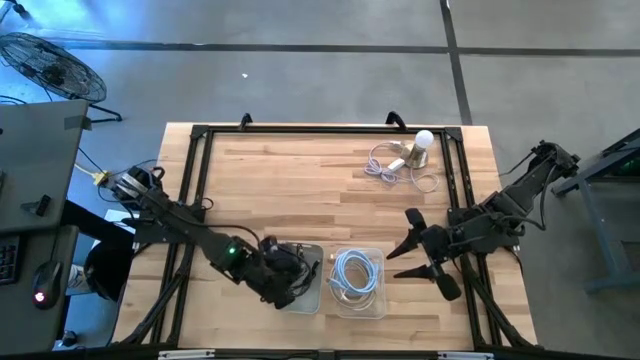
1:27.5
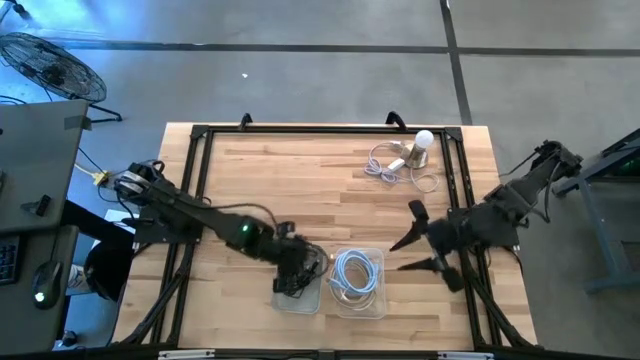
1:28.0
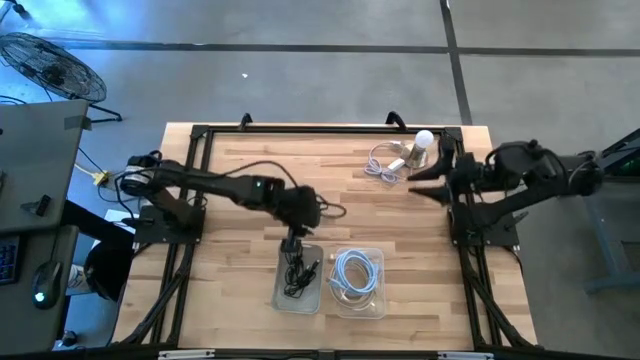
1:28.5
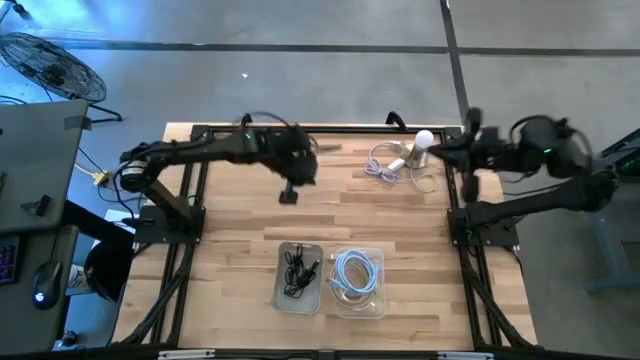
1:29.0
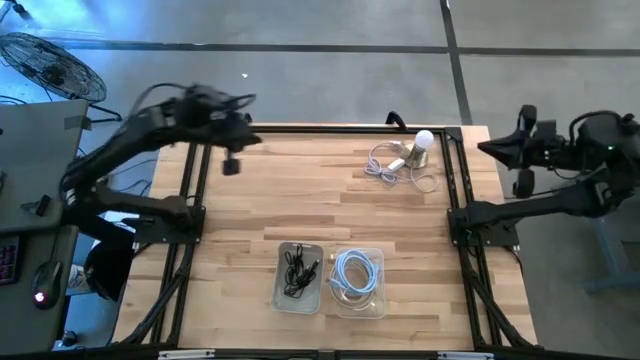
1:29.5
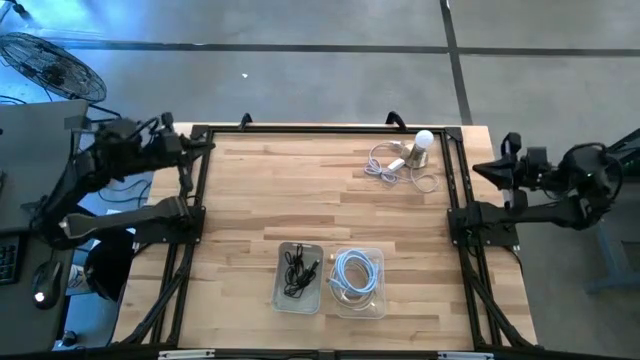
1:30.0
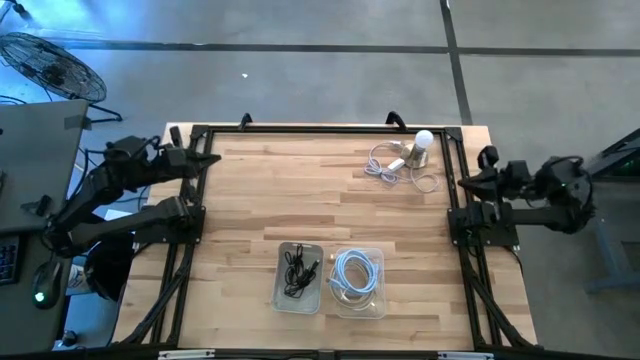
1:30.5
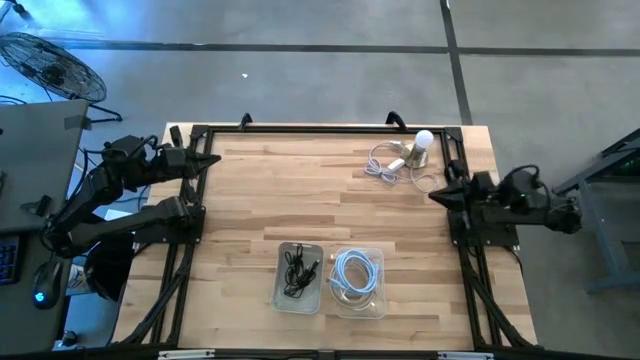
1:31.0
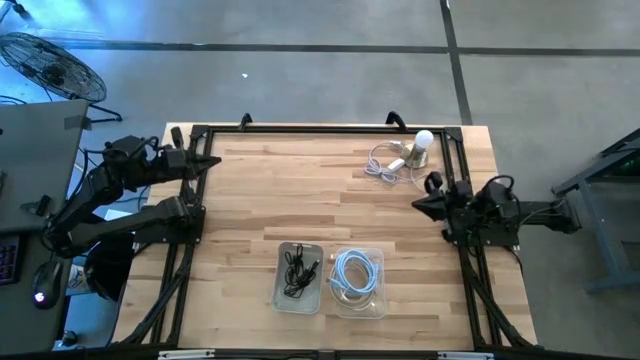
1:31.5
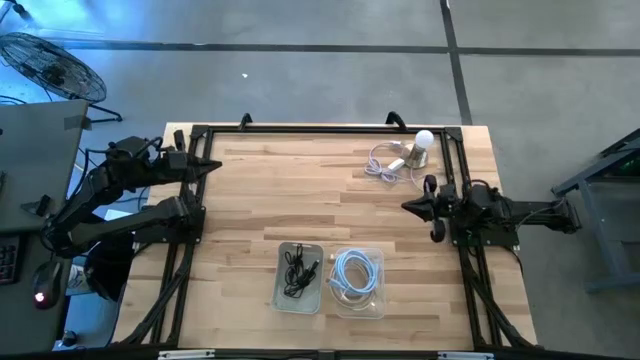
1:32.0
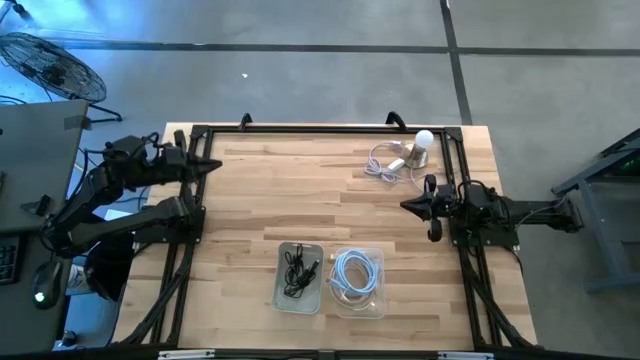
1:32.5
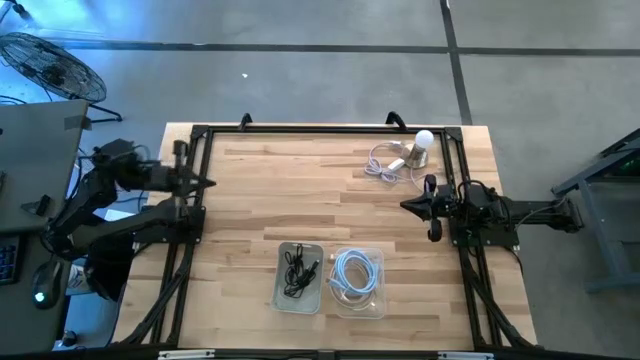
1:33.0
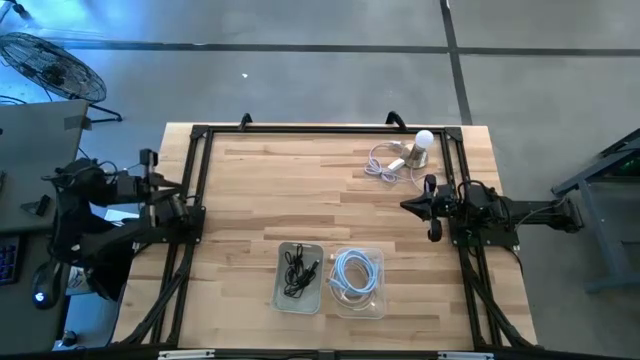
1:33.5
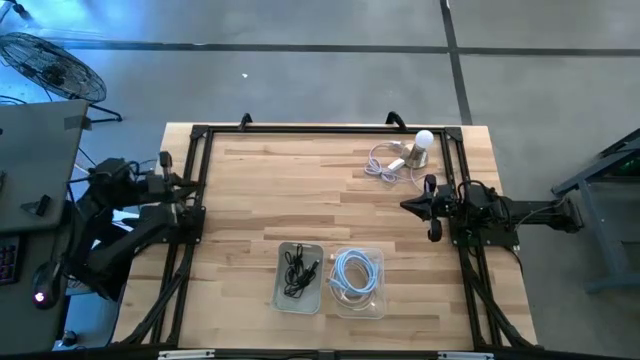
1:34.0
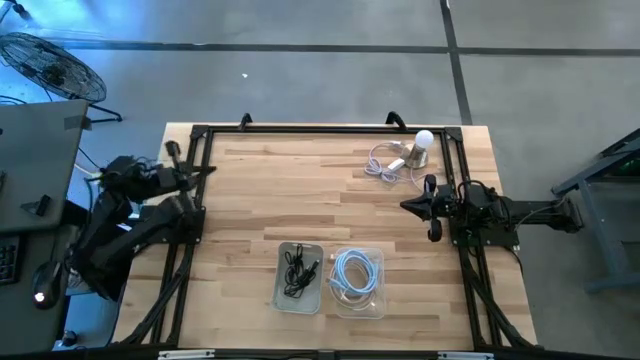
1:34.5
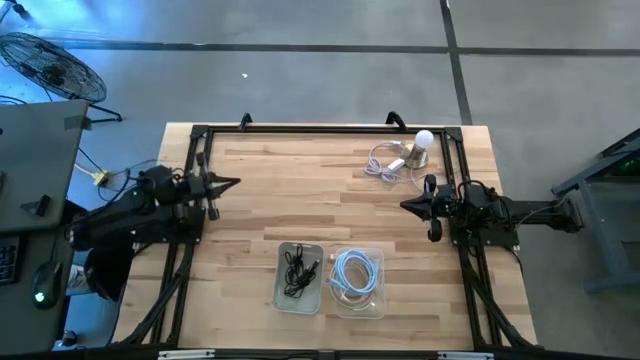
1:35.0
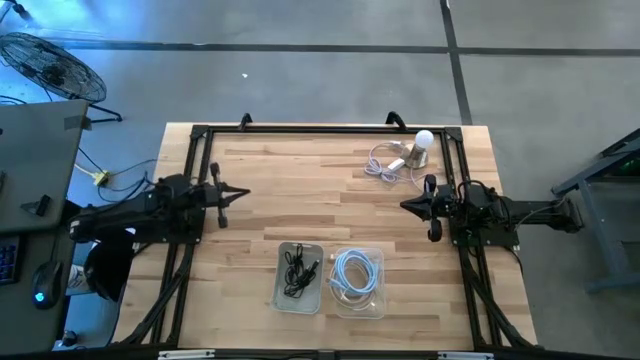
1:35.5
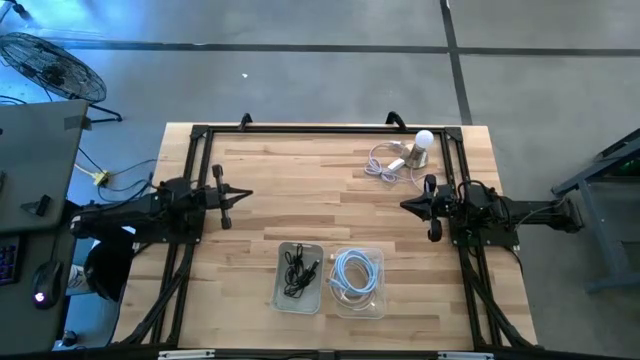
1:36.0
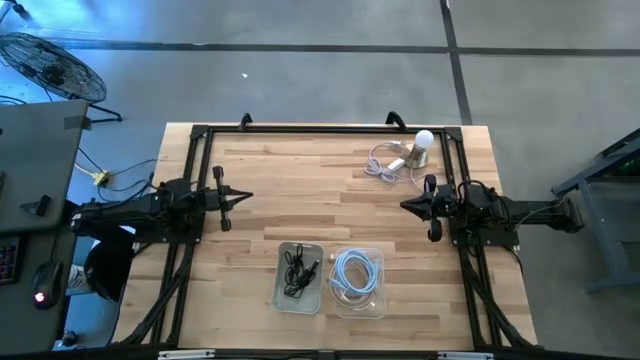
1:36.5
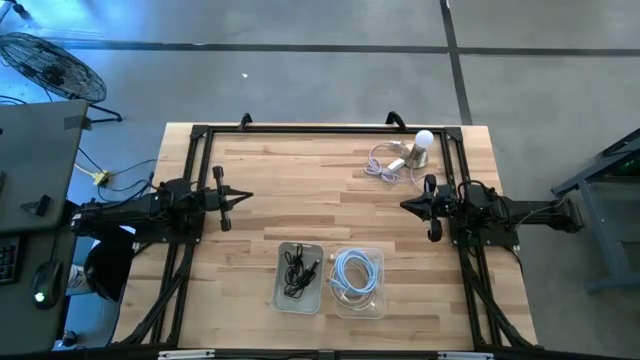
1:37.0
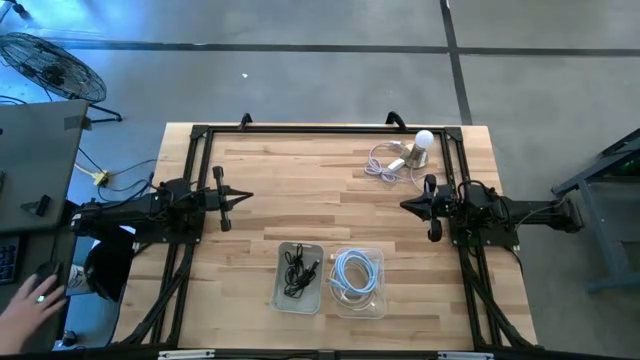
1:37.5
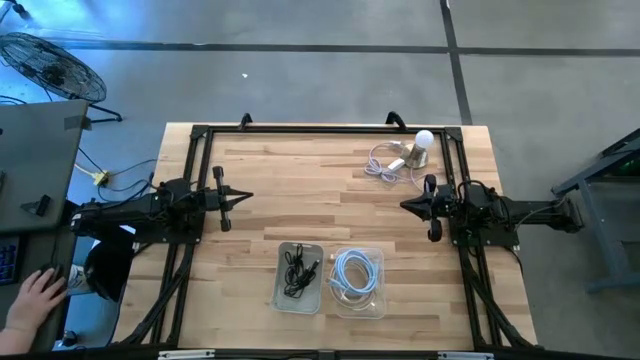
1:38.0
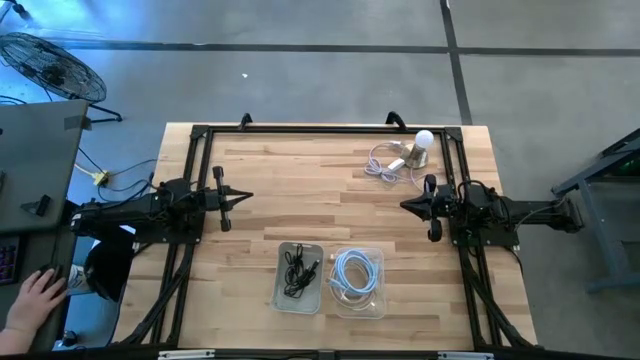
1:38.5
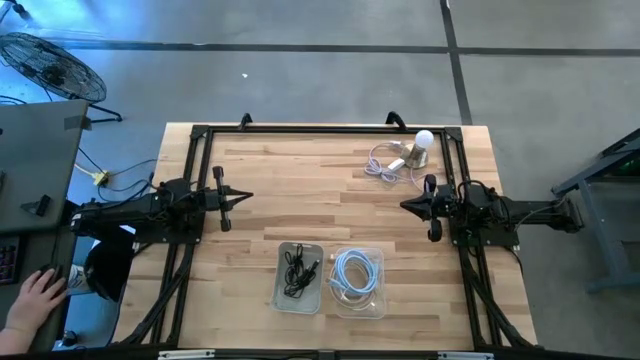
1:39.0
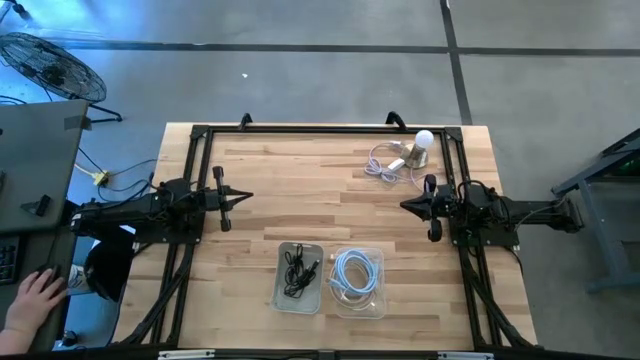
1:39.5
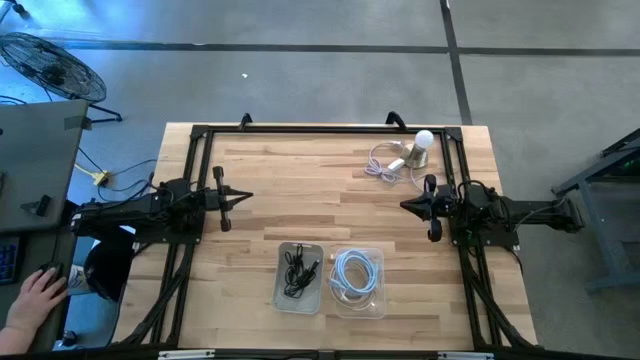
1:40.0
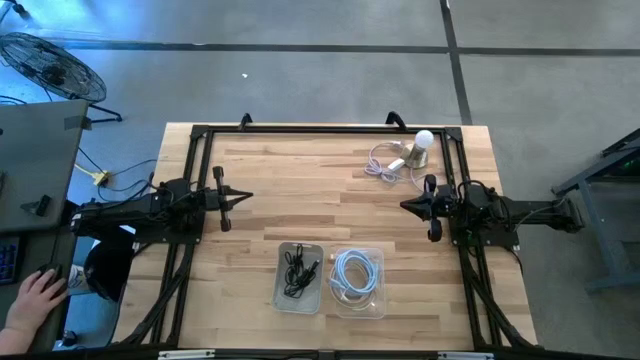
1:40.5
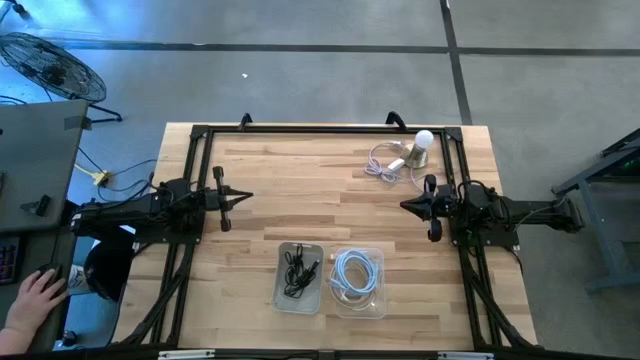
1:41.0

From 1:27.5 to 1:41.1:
Task: Pick & Place USB Port
Return to Home Position

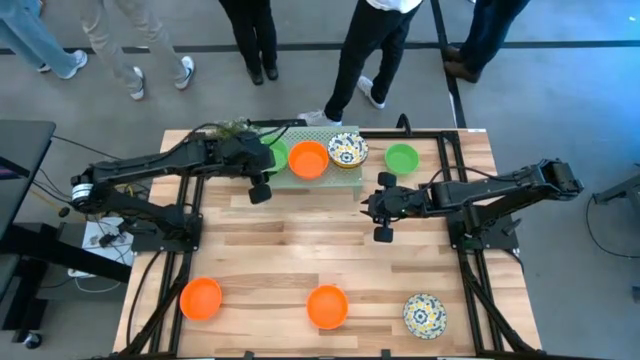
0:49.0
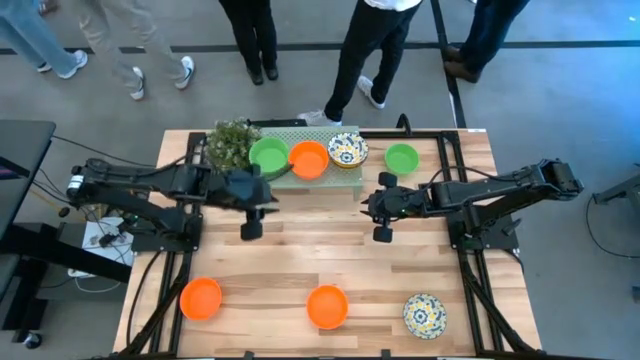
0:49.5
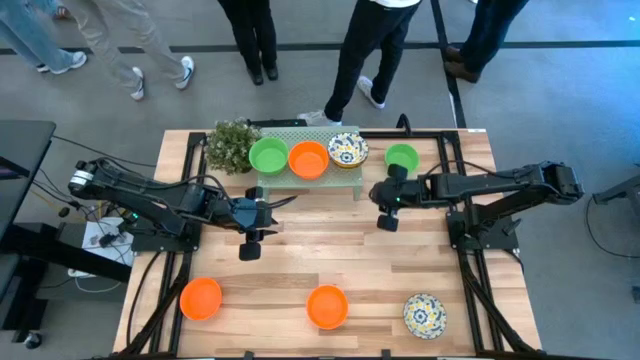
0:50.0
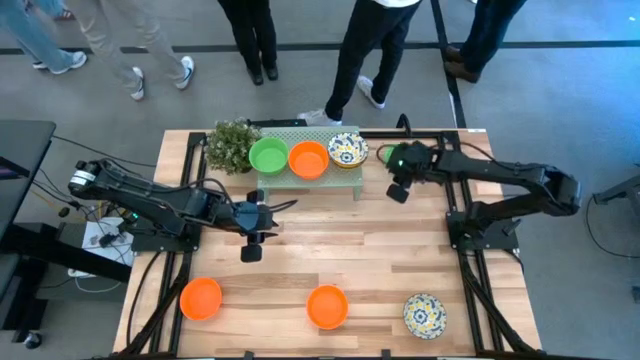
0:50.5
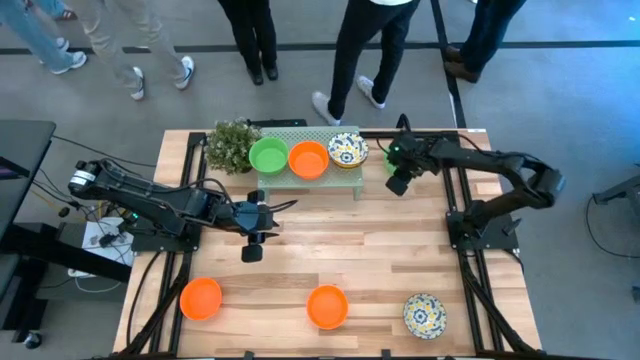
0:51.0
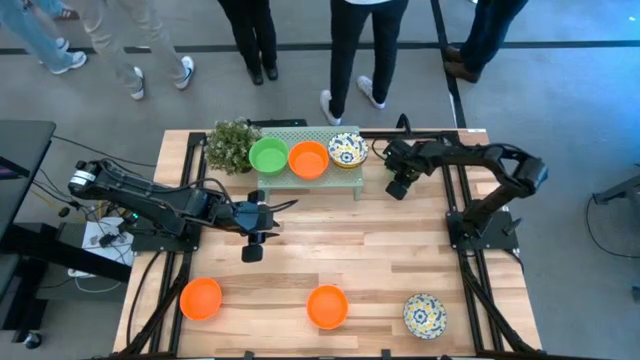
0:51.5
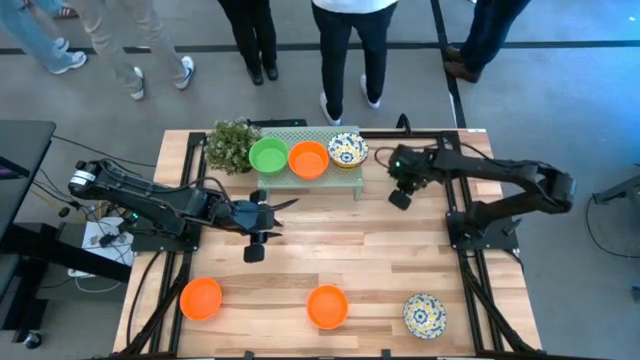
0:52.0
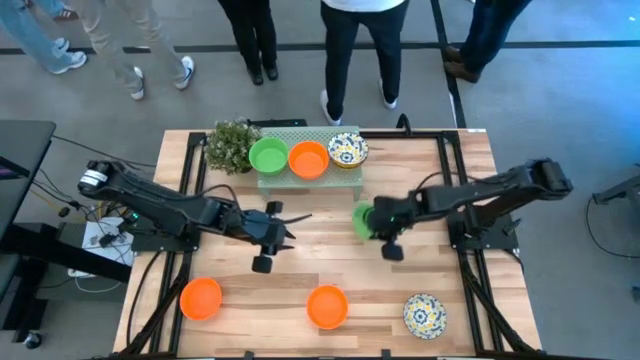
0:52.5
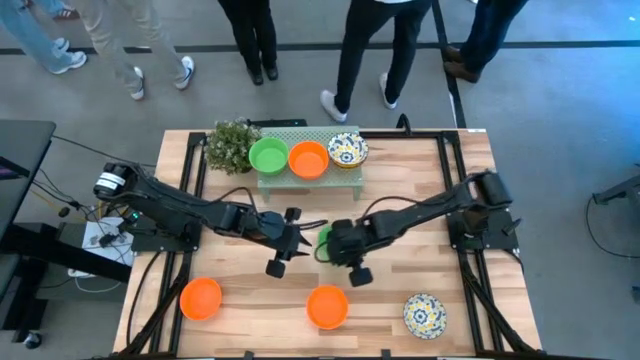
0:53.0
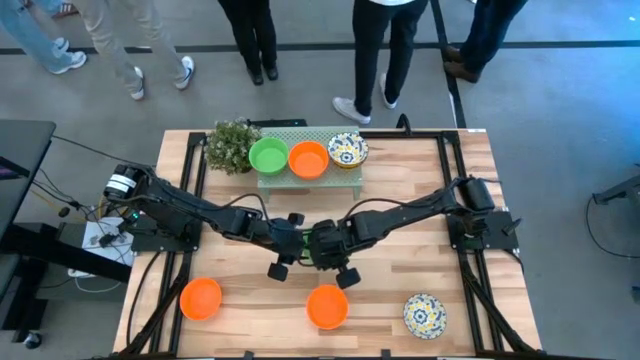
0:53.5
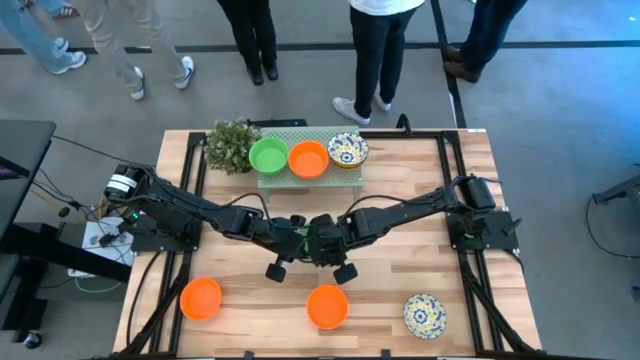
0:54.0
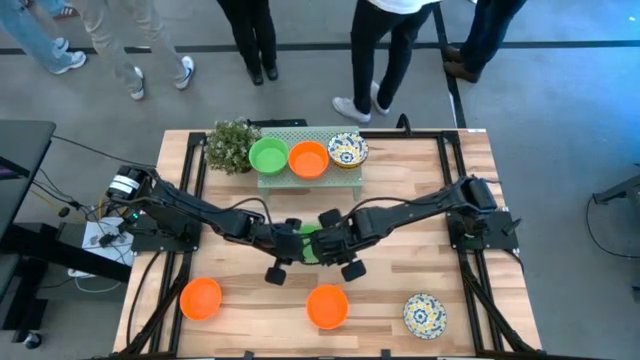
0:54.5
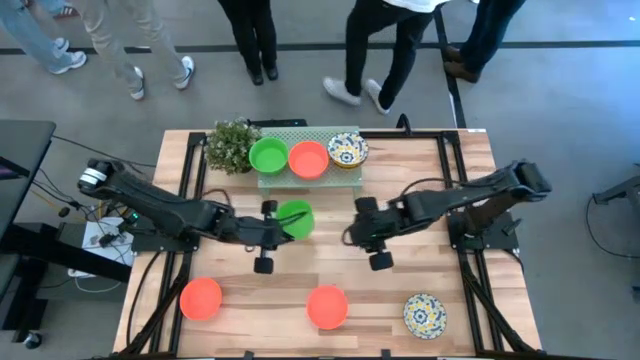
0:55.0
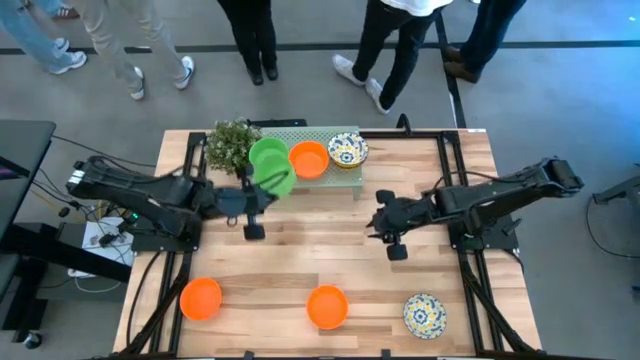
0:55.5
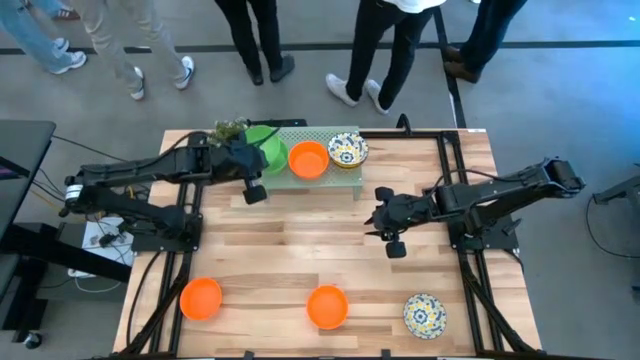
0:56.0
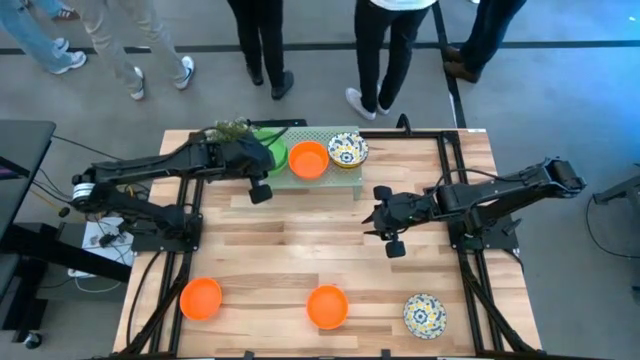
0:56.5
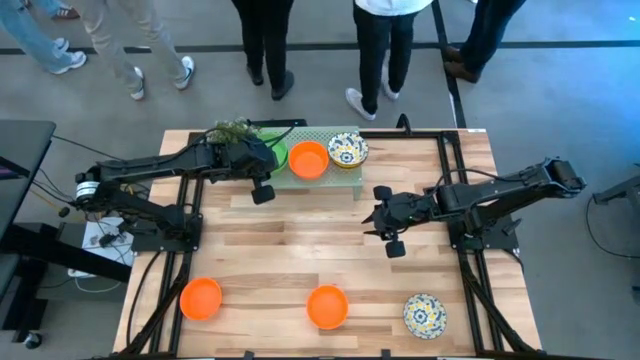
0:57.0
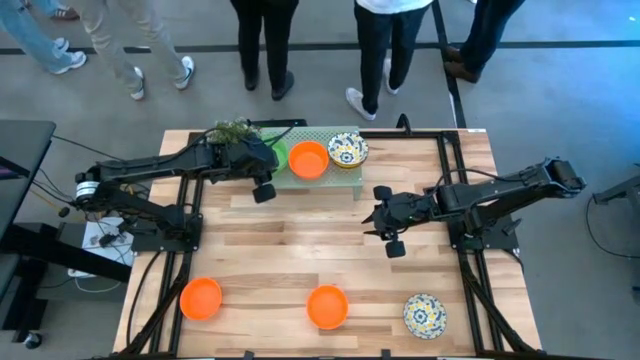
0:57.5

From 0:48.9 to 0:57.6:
Task: Pick & Place Mini bowls
Stack the green bowl on top of the green bowl on the shelf
